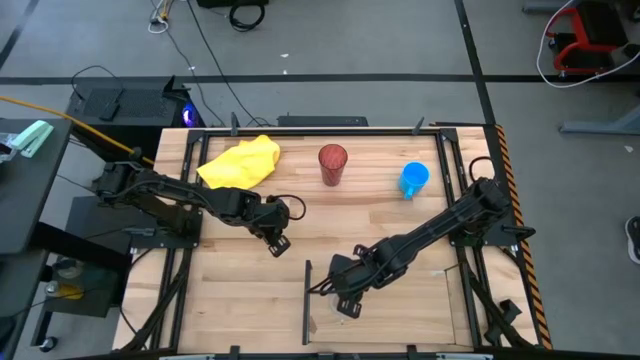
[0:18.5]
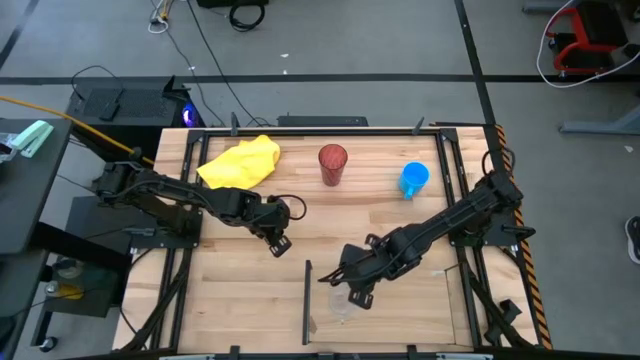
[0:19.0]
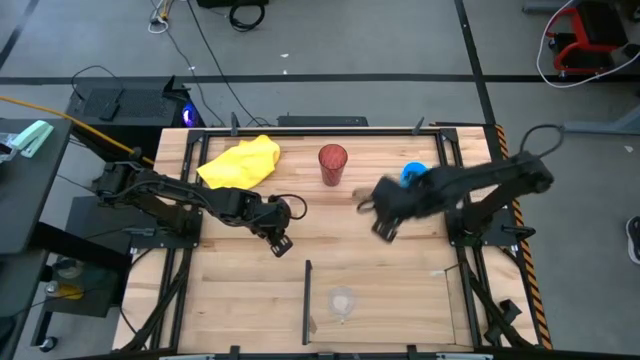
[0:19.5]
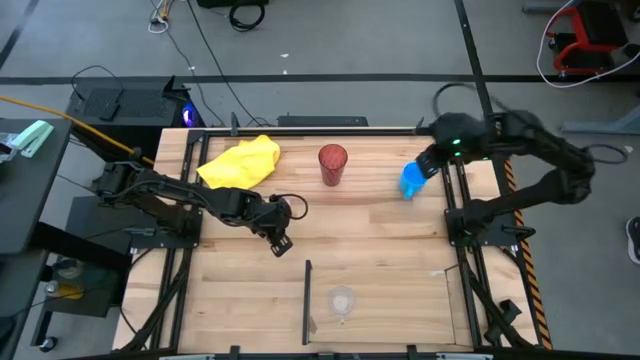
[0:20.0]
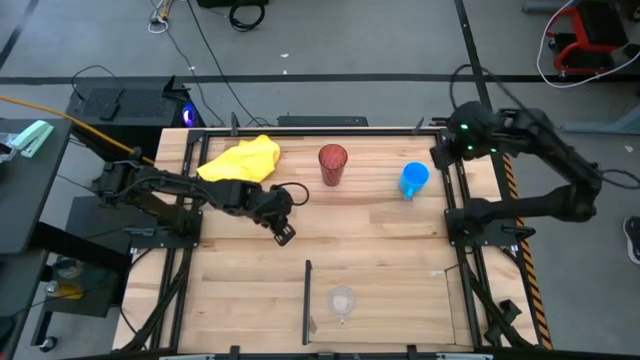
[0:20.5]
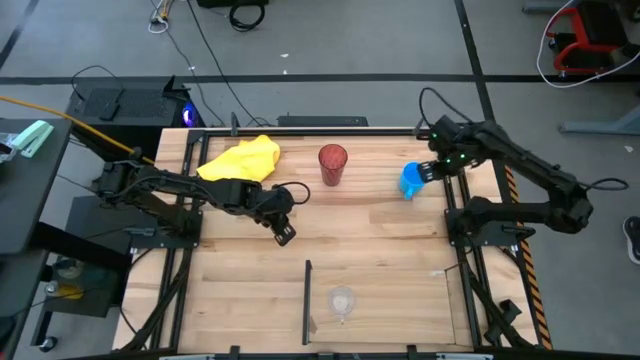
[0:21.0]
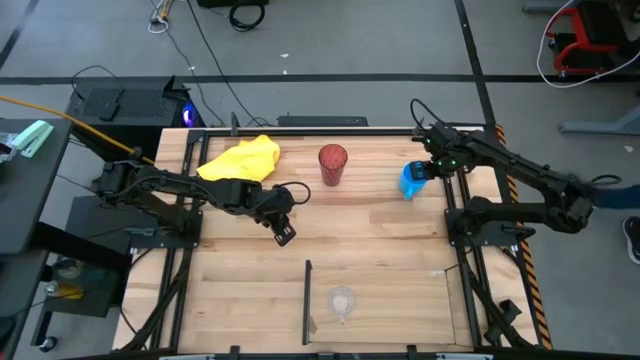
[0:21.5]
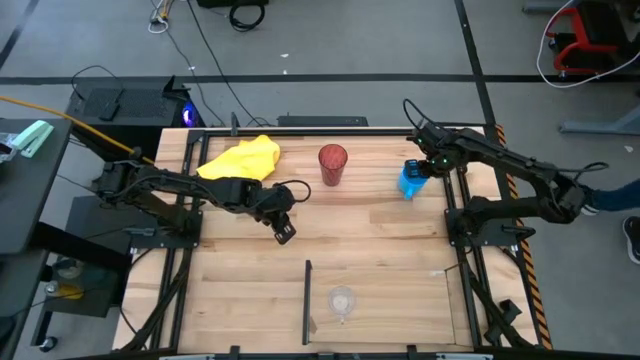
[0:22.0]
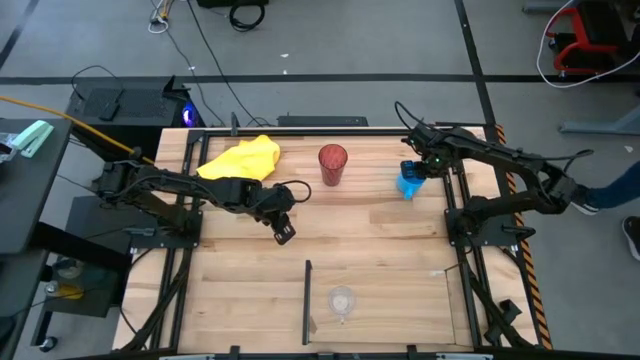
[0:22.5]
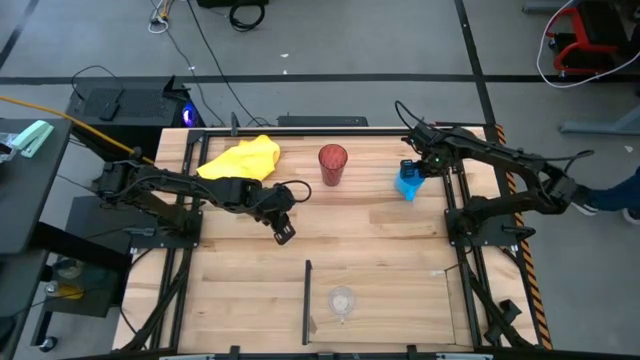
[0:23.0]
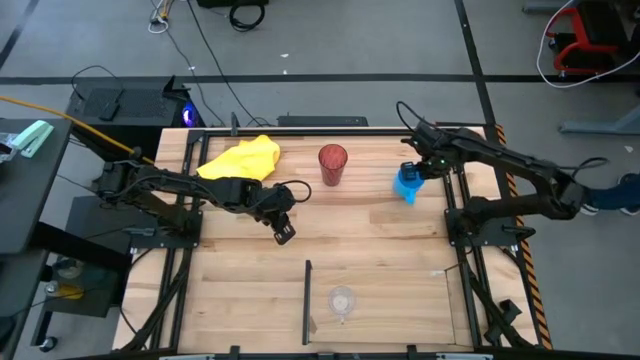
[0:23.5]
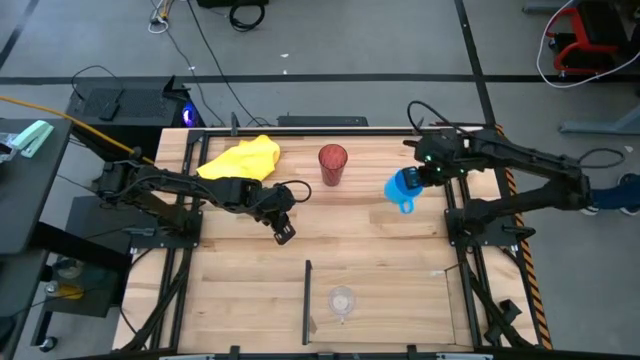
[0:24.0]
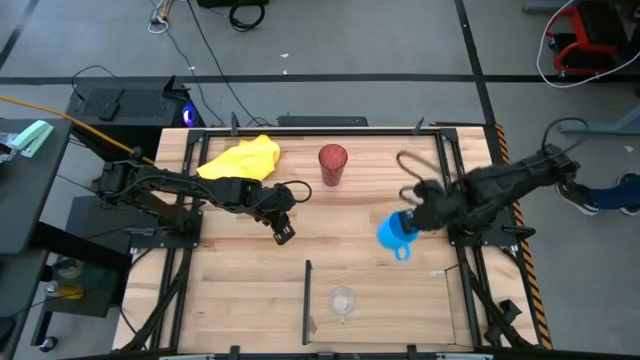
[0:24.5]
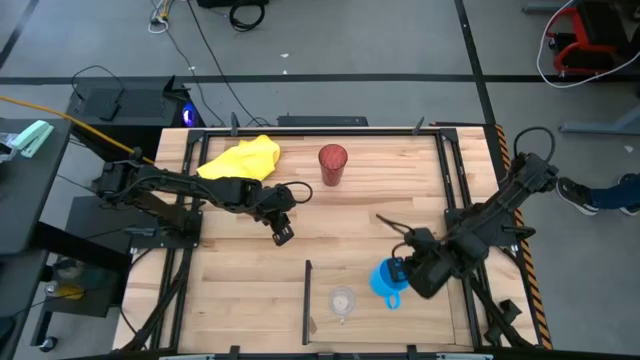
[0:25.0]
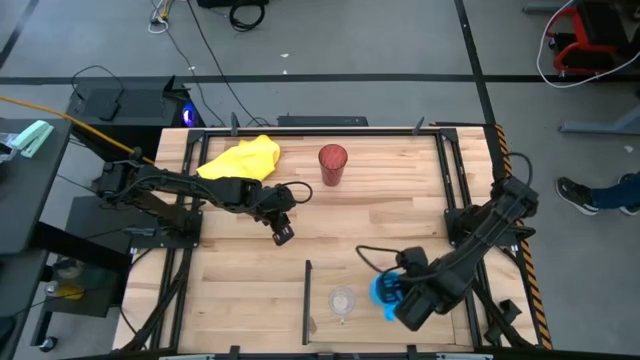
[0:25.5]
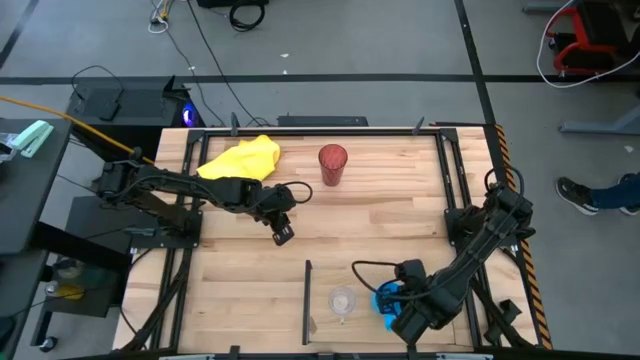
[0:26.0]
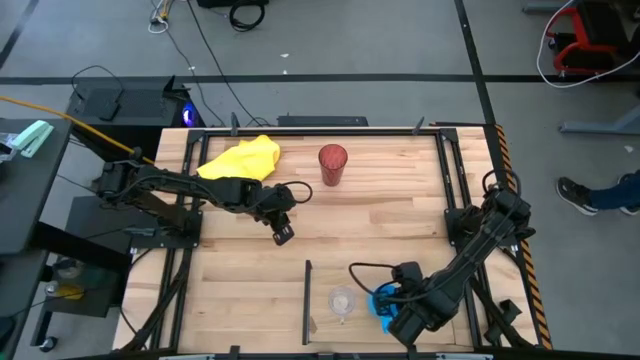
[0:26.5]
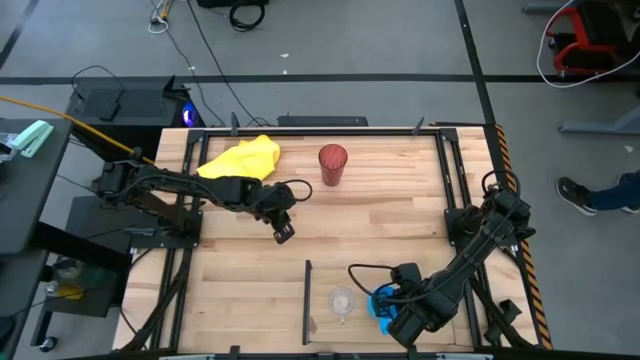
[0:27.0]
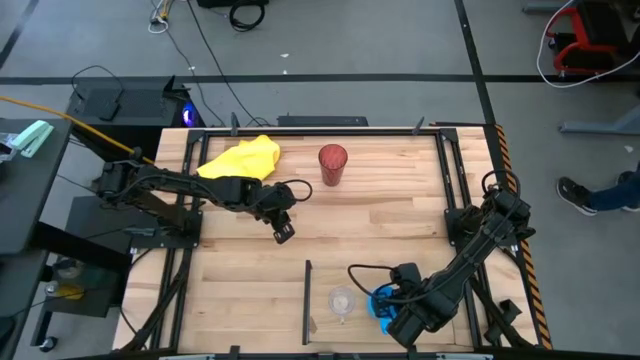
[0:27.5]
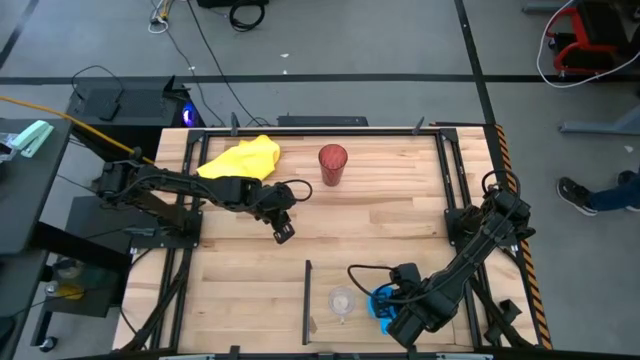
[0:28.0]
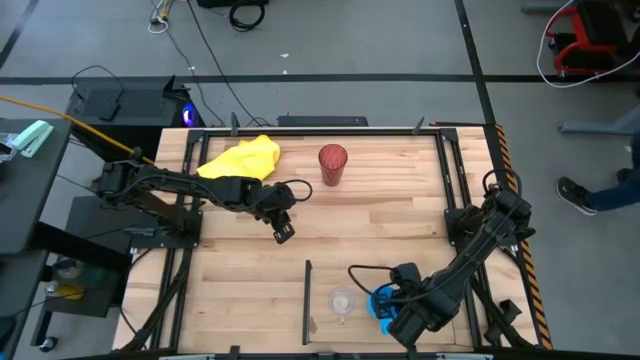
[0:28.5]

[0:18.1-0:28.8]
Task: Stack small to large cups/mugs on shelf
Put the blue mug on the shelf

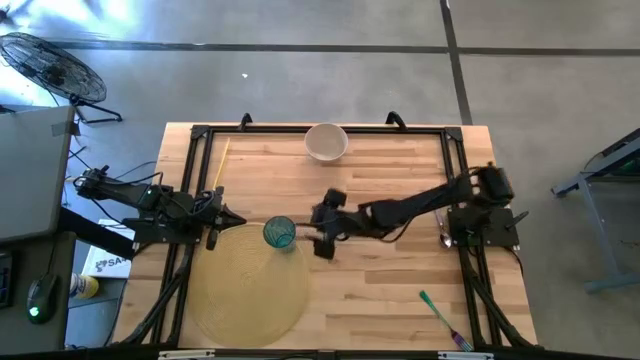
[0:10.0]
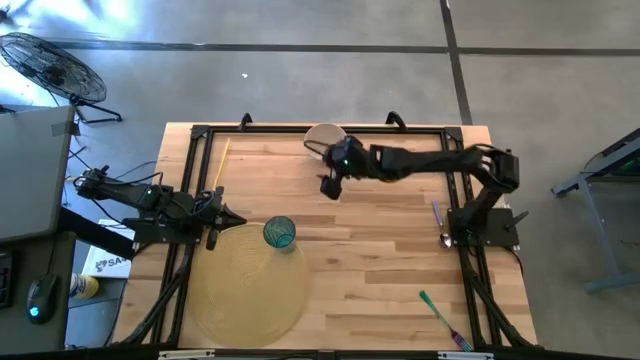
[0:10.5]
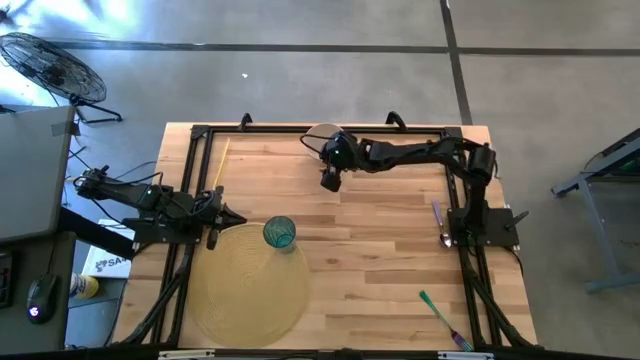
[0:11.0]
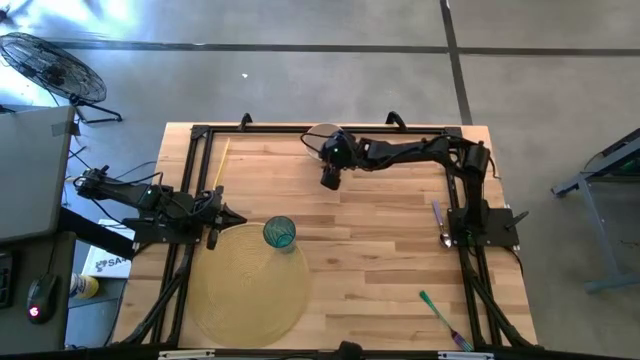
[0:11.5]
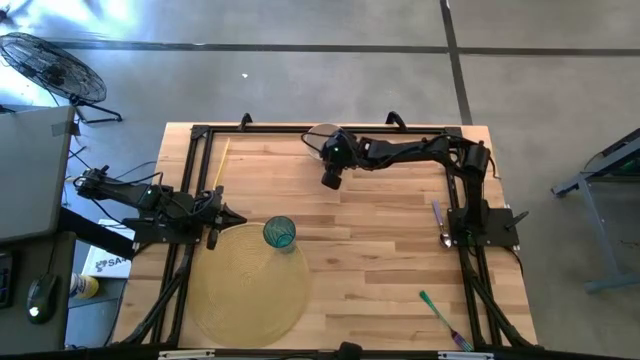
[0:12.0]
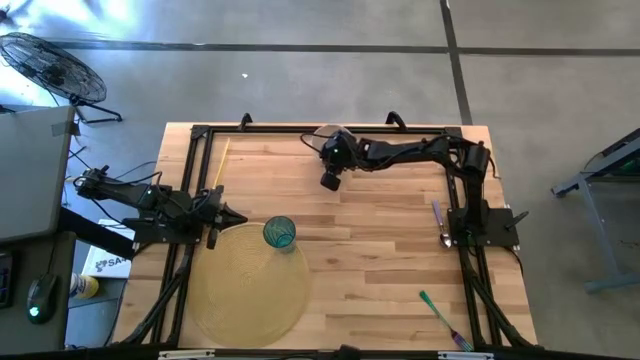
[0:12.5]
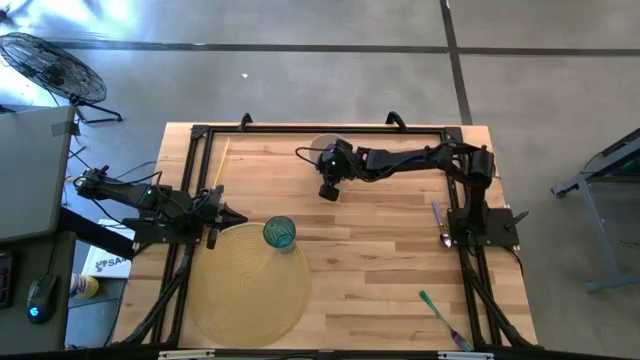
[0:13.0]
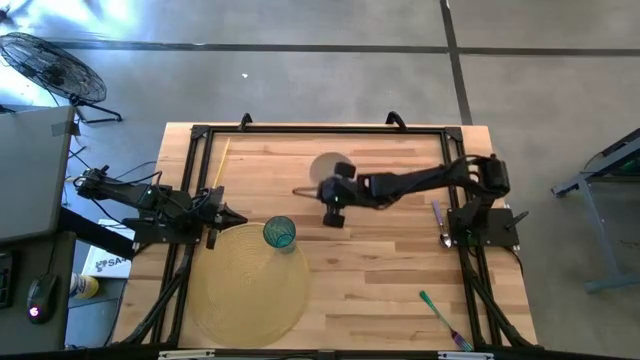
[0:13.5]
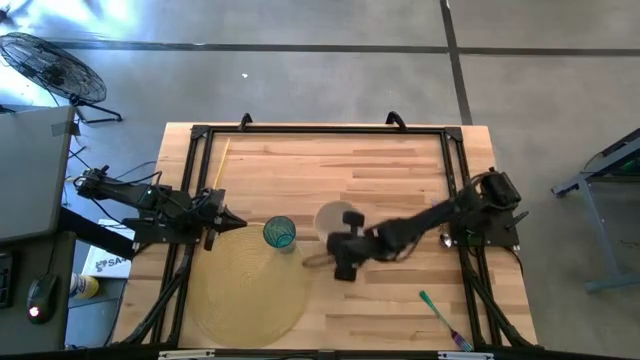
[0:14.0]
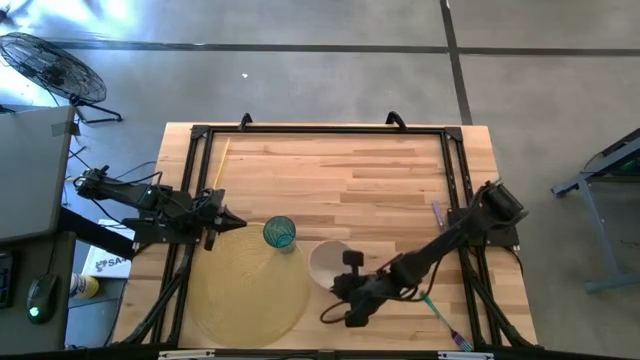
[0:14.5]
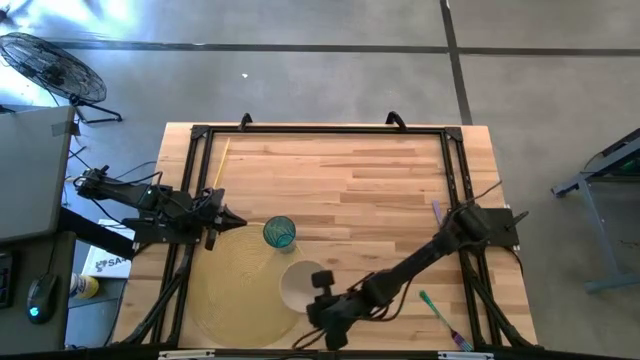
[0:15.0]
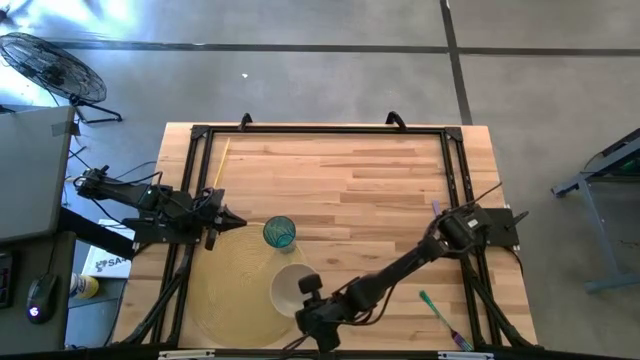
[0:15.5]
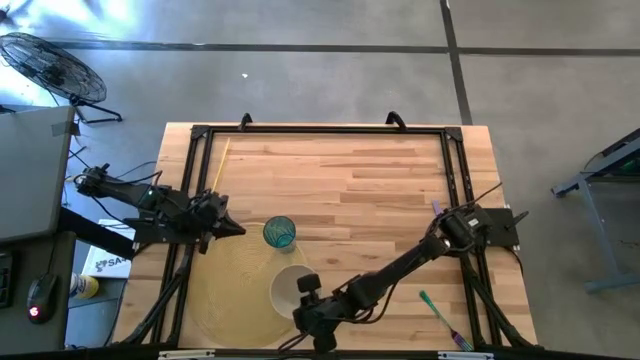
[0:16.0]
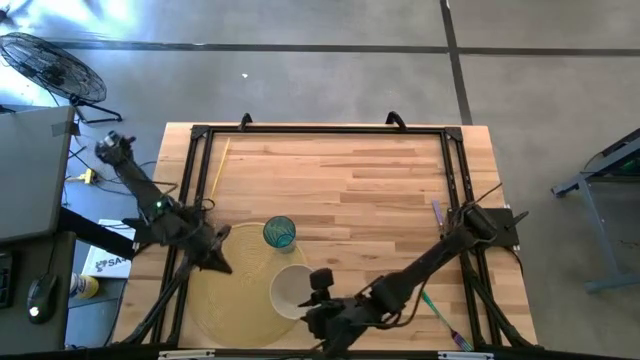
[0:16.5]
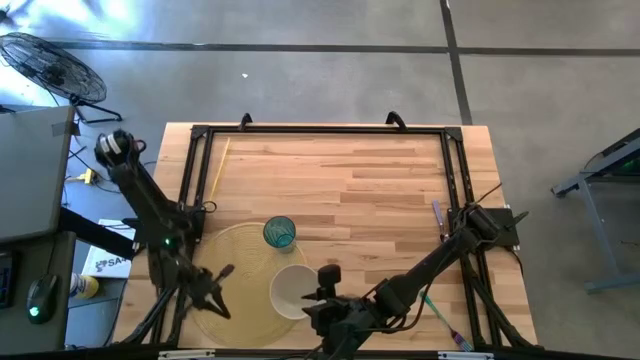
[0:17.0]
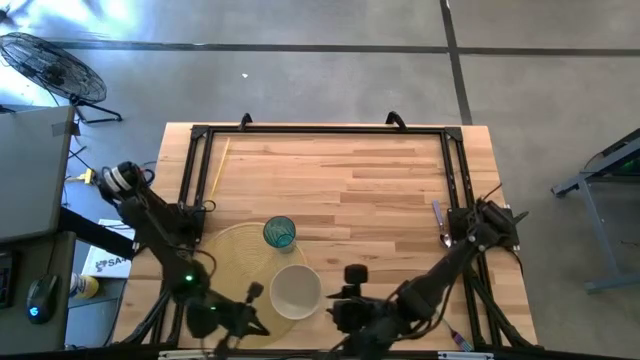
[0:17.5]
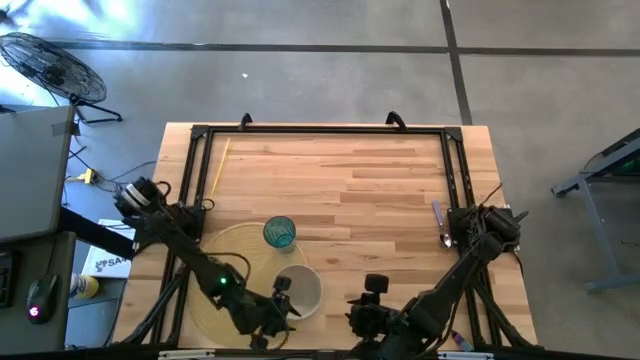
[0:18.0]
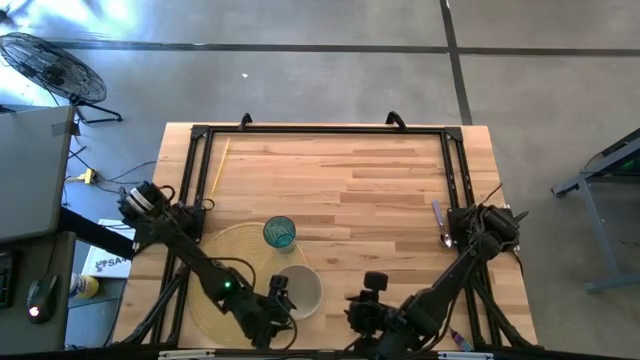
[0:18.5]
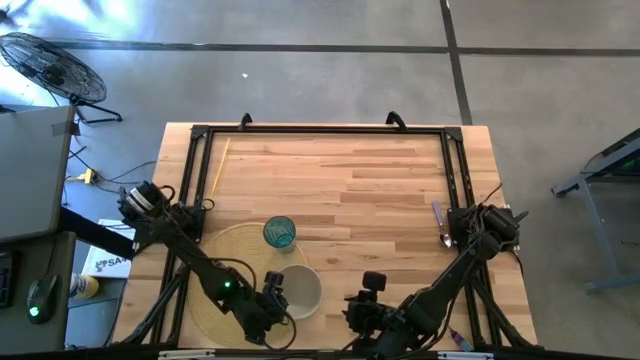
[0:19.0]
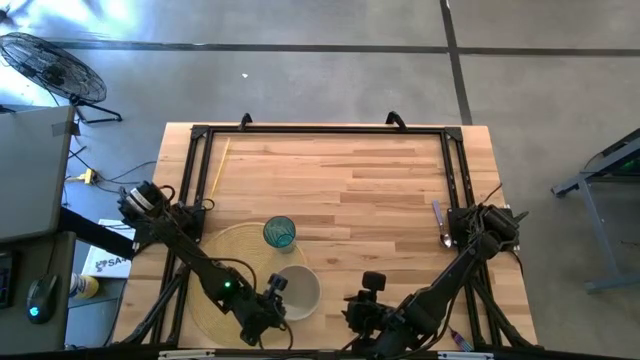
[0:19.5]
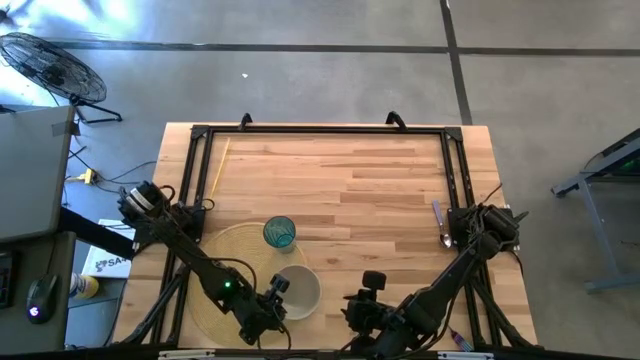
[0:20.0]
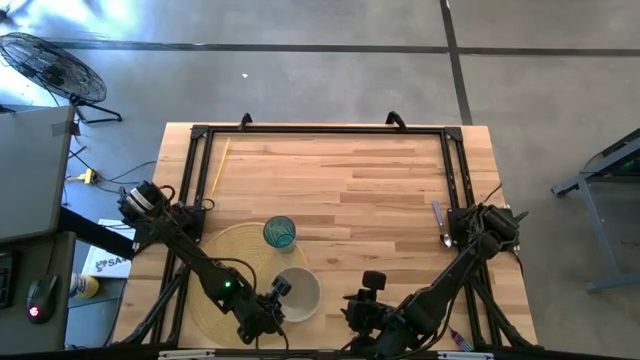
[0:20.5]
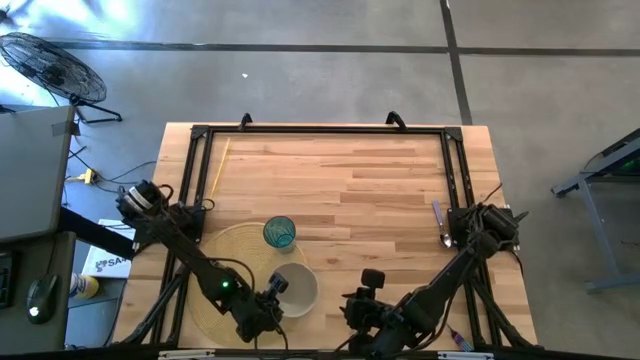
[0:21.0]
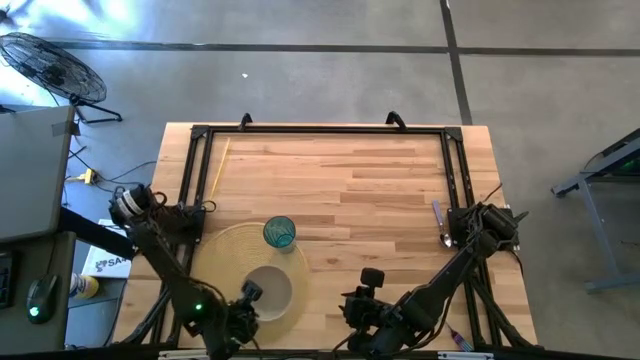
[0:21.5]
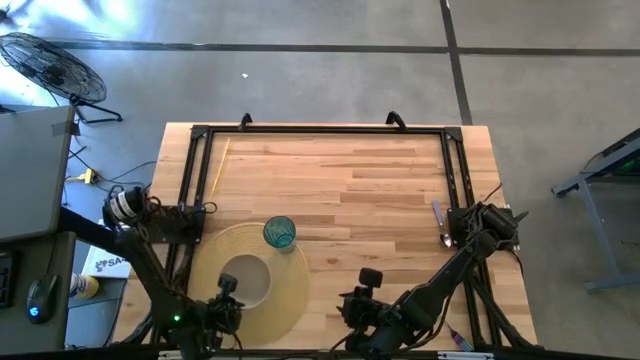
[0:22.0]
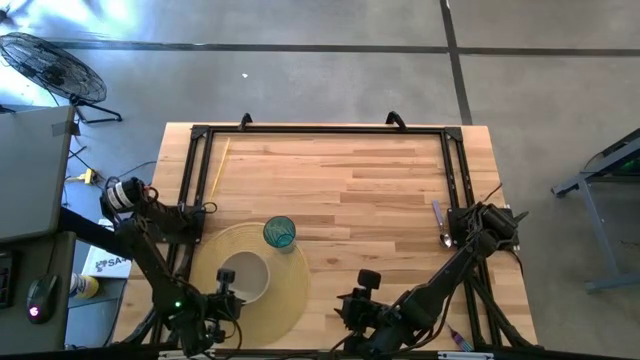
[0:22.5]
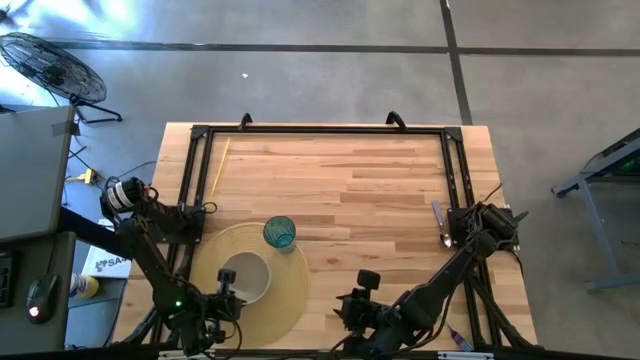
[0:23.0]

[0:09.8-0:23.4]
Task: Pick & Place Utensil
Put the white bowl in the middle of the woven mat
